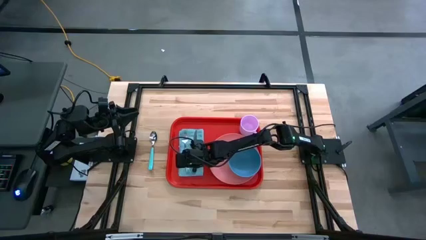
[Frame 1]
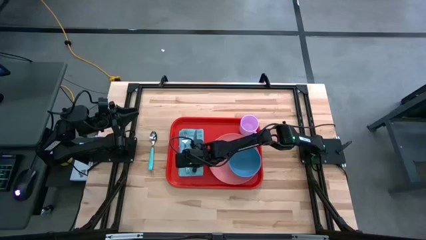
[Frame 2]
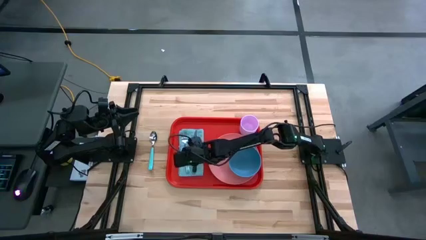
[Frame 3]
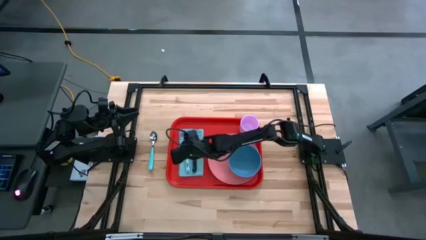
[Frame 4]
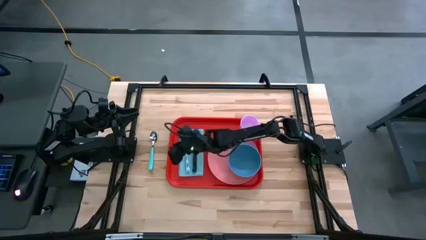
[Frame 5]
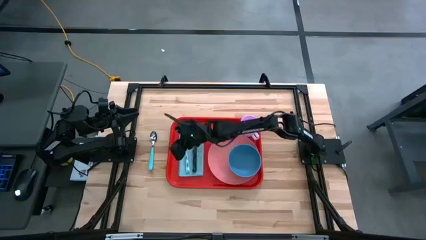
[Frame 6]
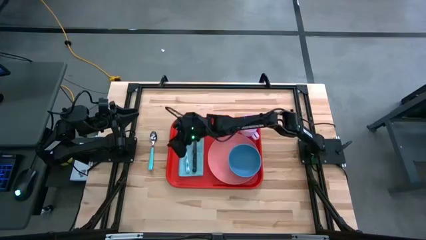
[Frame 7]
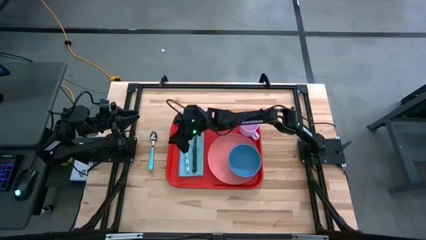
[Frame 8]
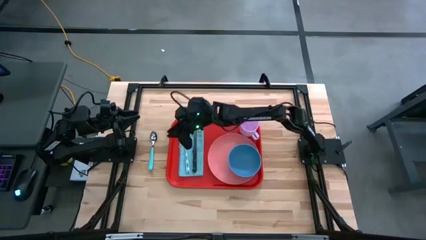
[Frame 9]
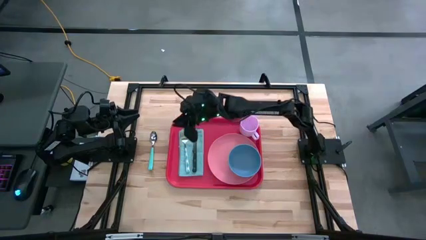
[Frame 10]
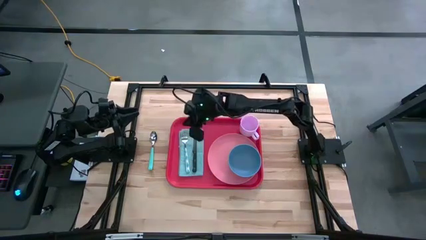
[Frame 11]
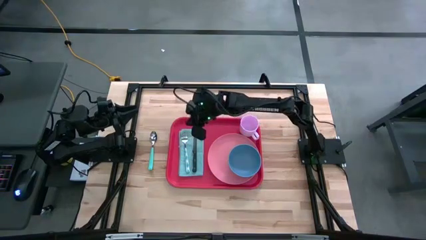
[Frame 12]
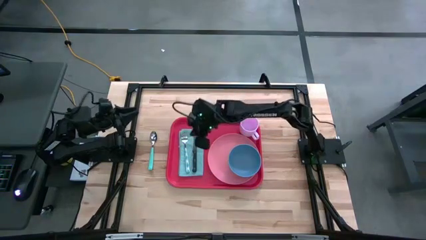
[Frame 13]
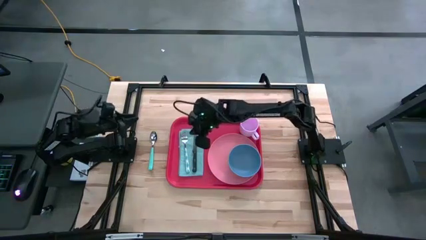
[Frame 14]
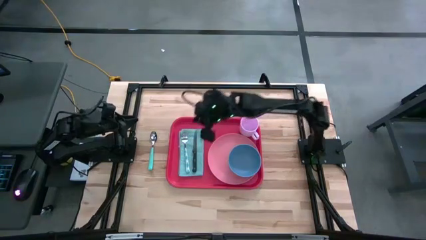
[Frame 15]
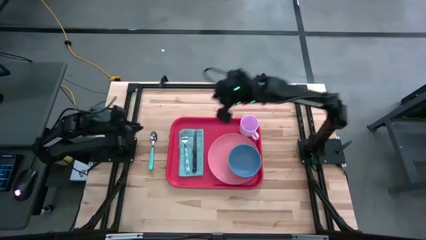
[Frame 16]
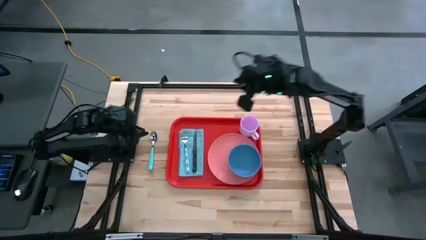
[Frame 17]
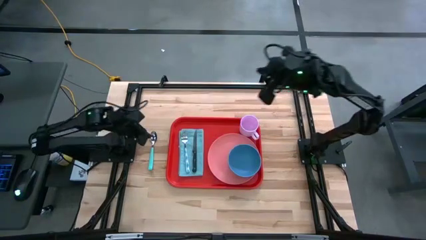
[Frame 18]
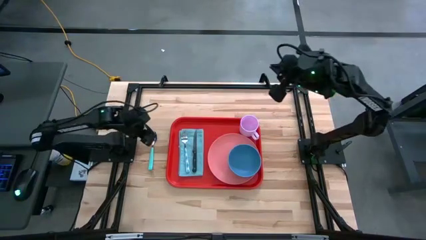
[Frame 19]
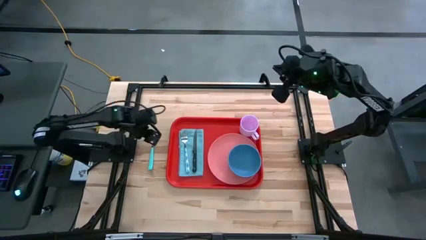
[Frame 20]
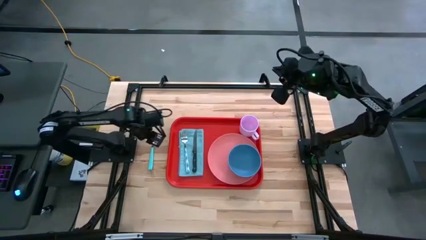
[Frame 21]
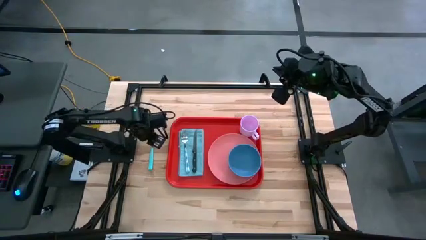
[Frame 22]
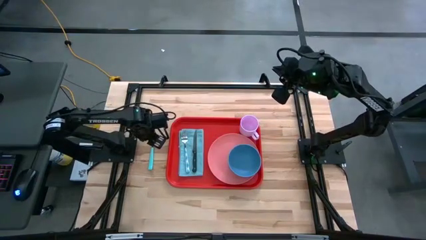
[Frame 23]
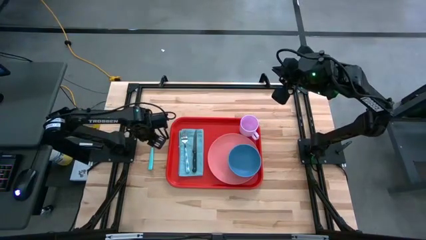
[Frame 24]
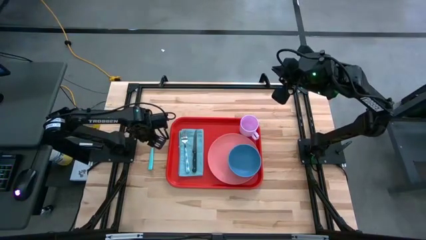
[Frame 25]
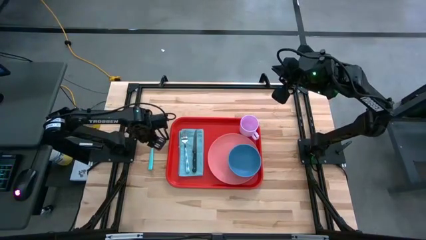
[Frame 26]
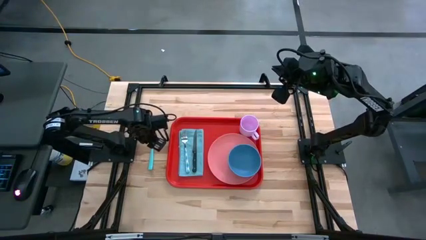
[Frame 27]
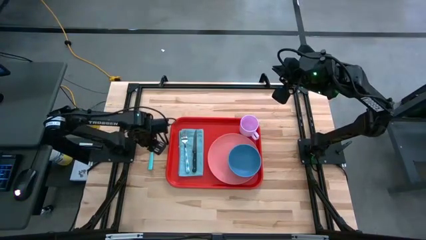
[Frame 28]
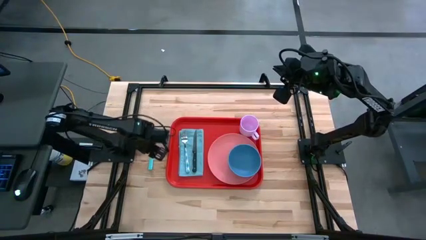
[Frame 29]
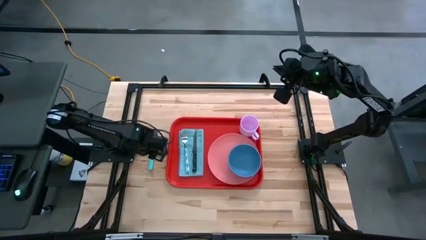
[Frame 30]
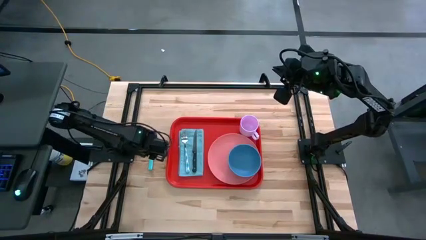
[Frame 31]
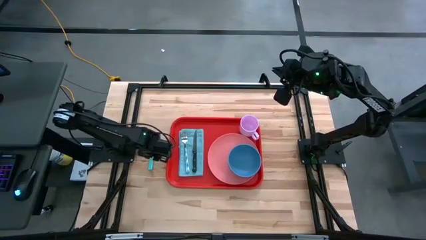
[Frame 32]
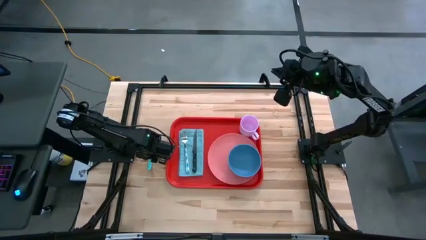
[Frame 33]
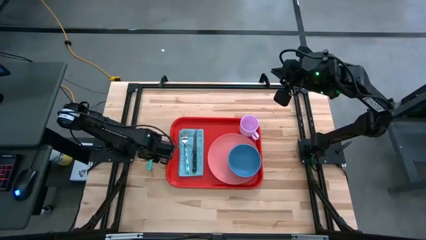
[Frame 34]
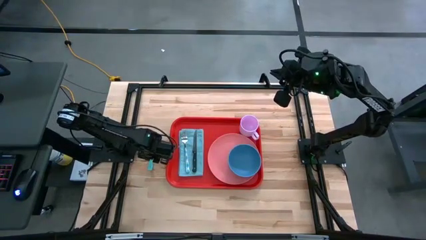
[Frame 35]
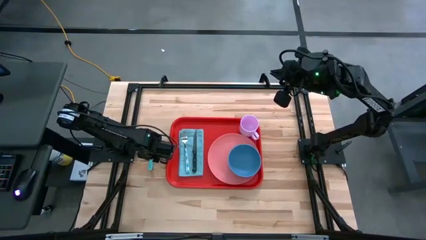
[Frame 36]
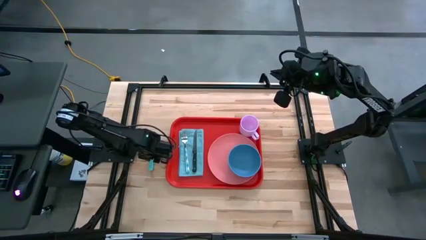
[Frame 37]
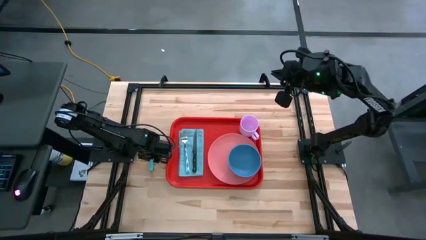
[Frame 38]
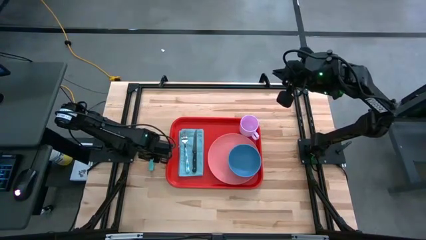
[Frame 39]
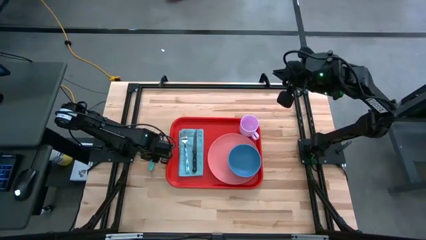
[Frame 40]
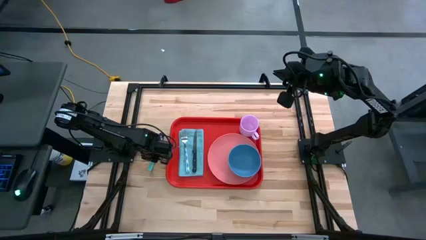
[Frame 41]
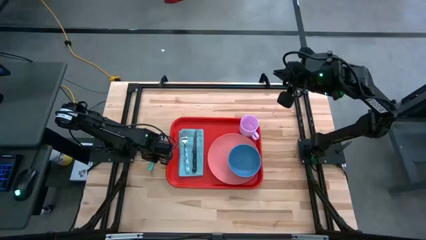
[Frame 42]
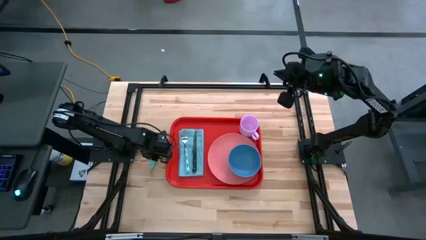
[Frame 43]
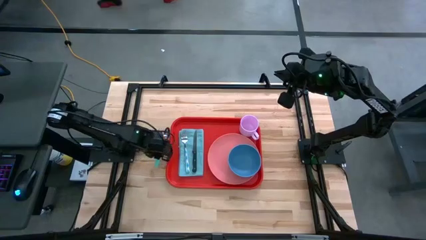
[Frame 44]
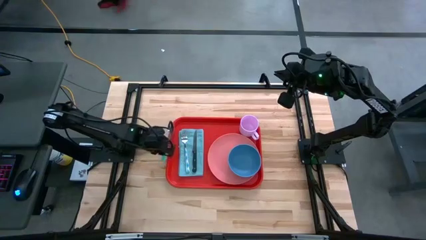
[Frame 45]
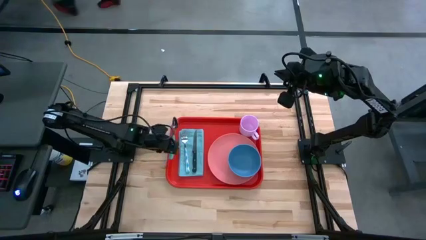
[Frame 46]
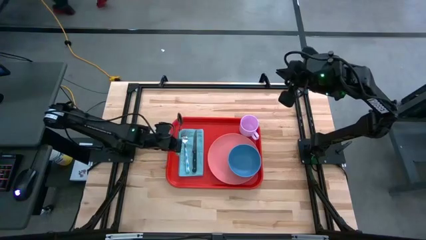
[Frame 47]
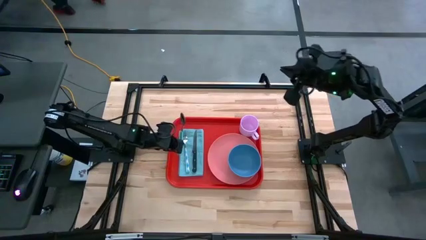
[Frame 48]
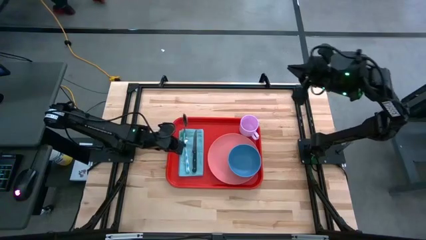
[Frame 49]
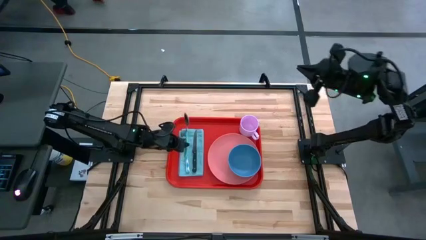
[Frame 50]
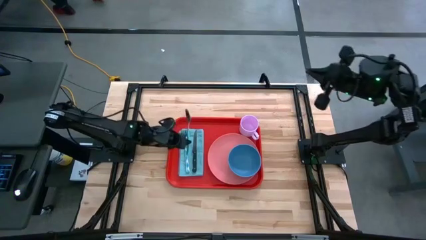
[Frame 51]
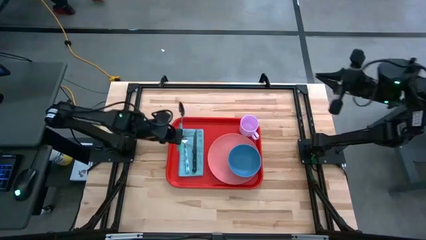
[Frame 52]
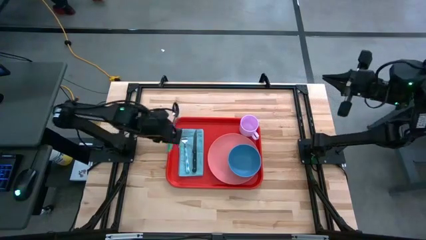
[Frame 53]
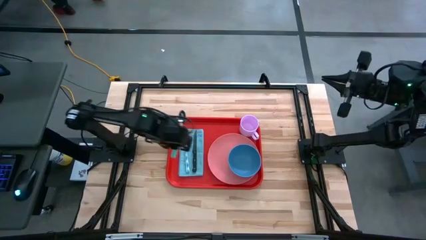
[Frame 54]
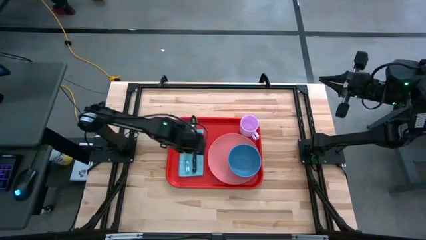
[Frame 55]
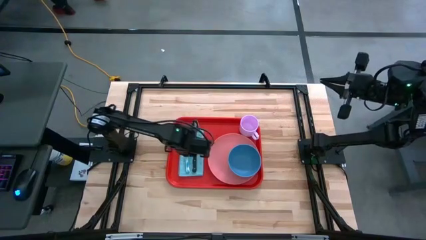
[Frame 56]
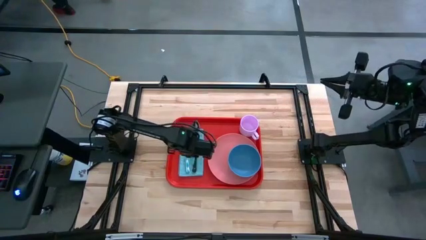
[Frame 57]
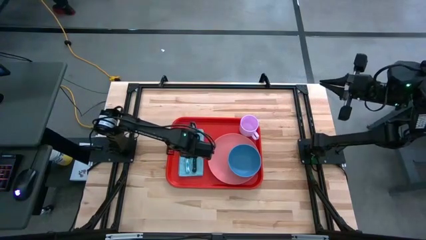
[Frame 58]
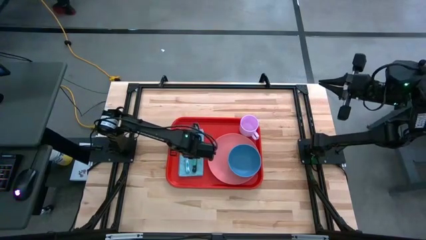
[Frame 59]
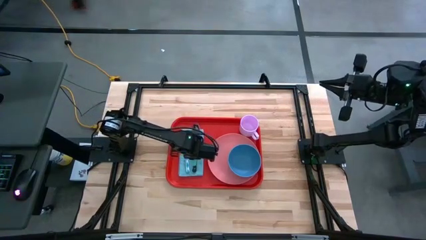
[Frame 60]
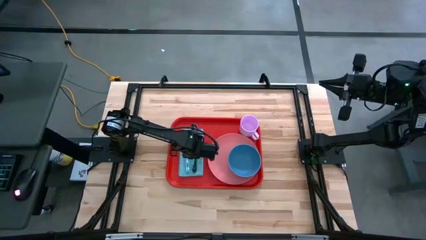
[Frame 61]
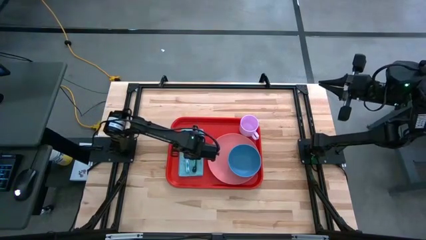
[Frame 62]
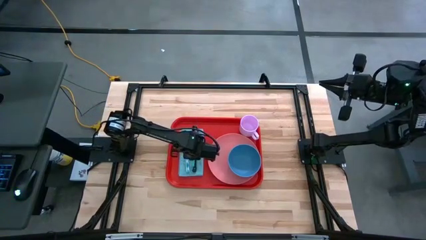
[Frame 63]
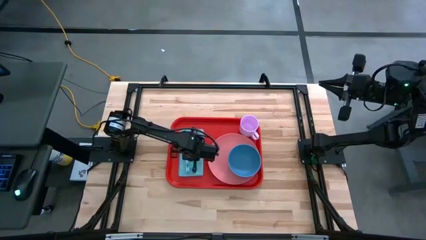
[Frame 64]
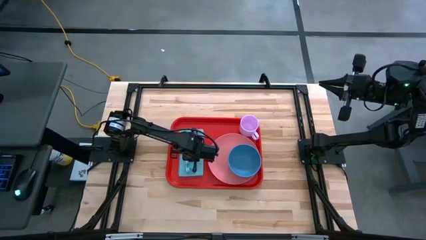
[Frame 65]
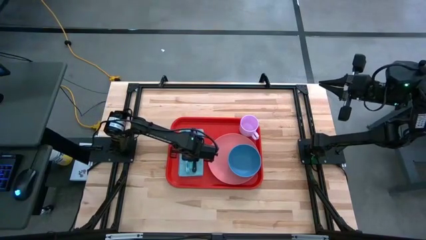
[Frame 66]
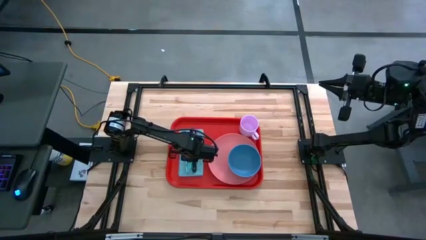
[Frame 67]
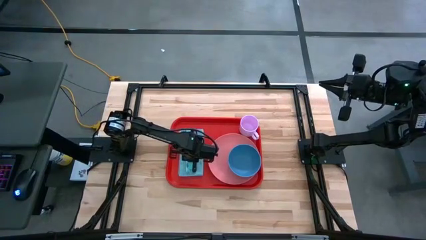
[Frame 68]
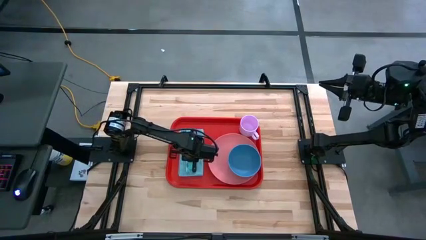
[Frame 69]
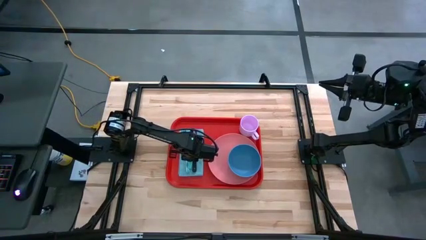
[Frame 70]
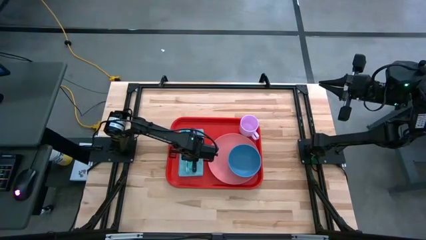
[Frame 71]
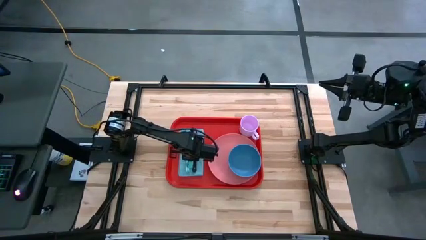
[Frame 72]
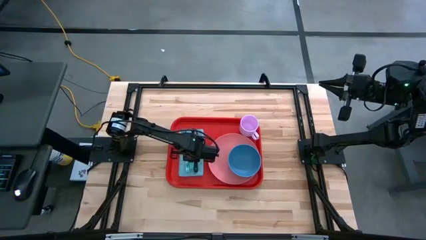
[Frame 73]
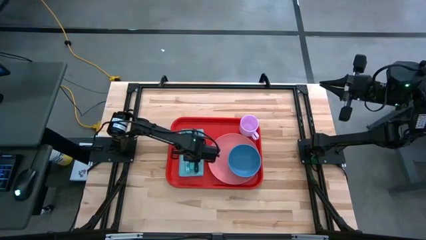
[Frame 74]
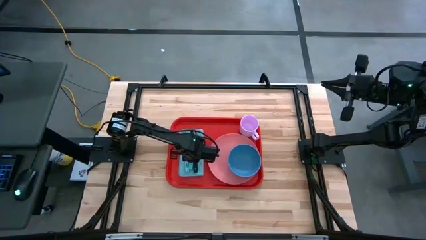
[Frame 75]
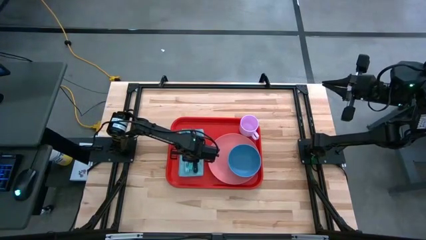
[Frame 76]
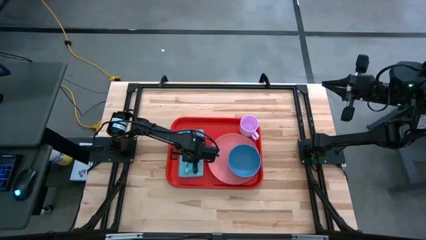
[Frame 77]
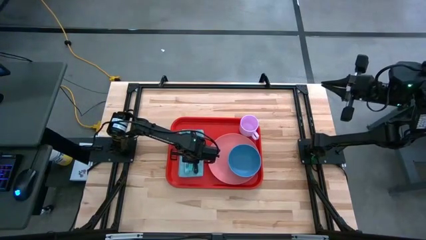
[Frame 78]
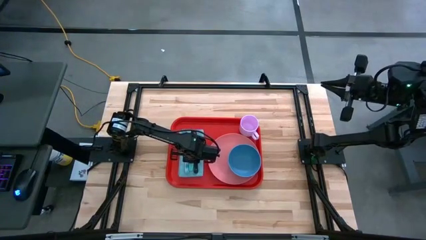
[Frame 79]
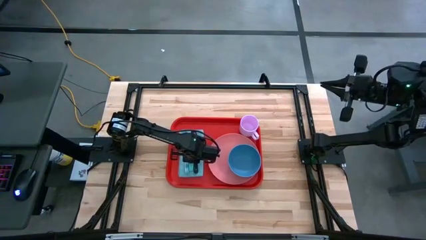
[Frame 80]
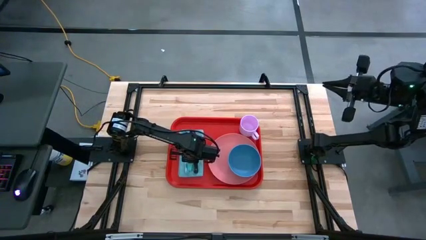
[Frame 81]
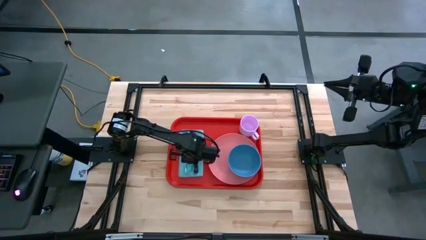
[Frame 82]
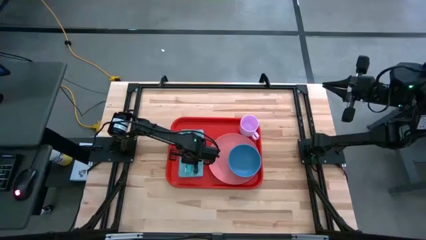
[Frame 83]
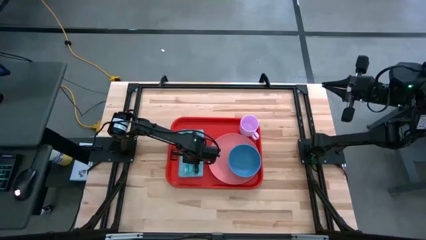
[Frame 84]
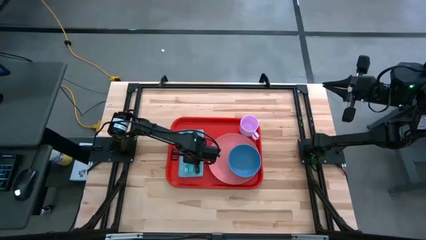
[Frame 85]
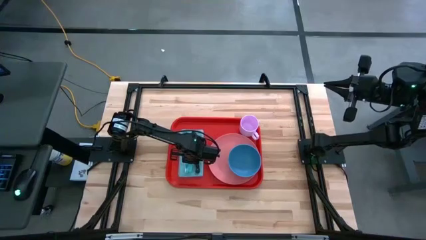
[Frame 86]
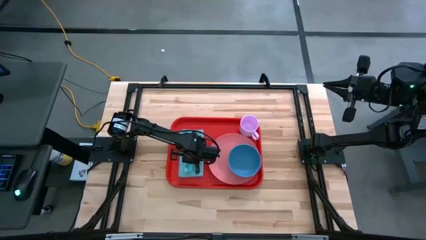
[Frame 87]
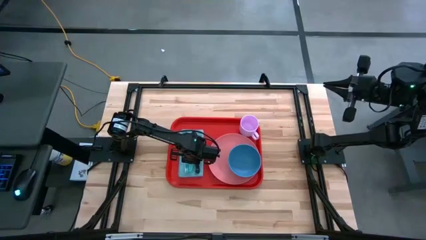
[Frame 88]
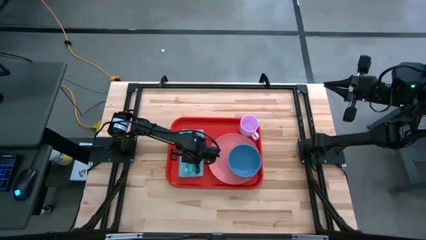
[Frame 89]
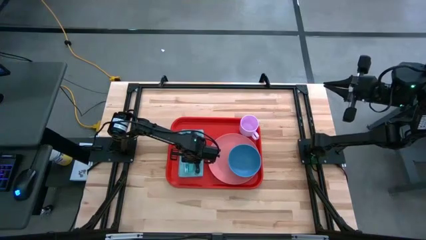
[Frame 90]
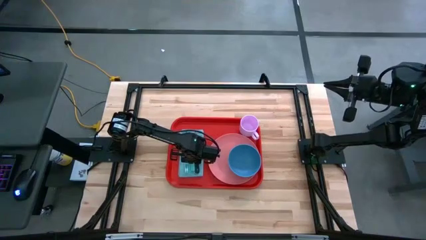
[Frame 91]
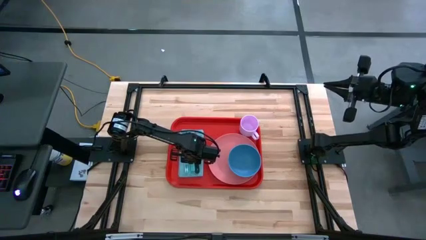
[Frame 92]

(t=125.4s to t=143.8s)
Task: Set up tray
Put the green spoon on the blue napkin to the middle of the blue fork and black knife
